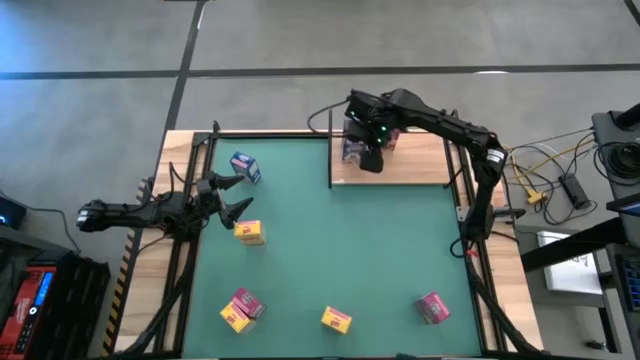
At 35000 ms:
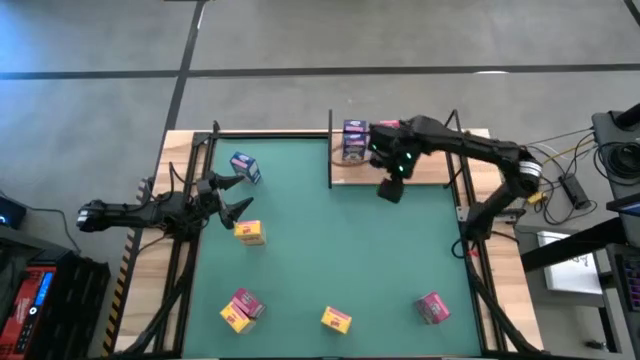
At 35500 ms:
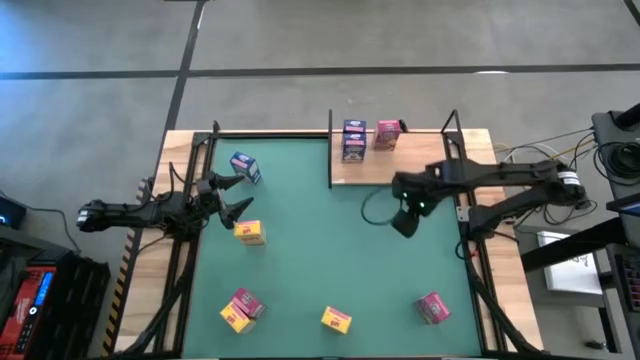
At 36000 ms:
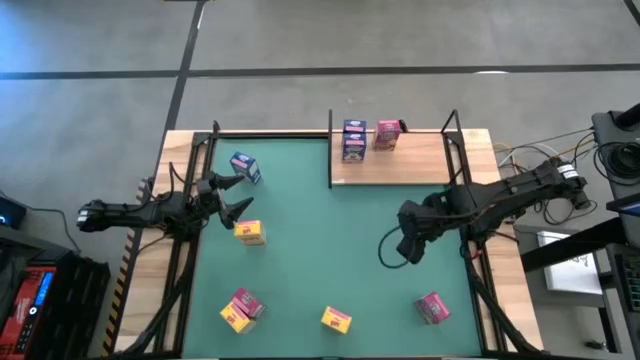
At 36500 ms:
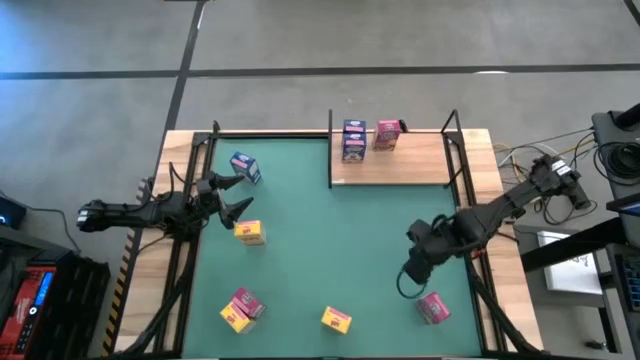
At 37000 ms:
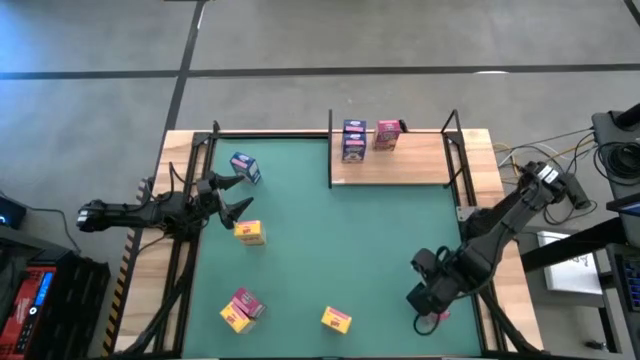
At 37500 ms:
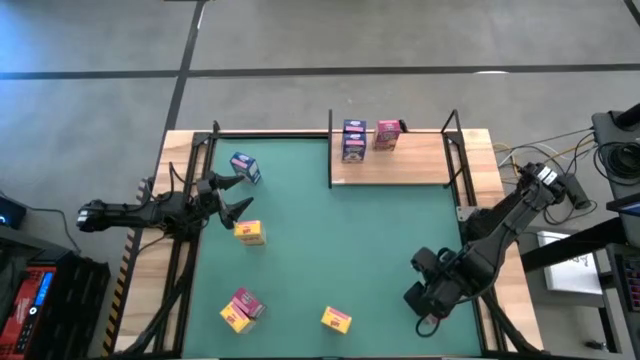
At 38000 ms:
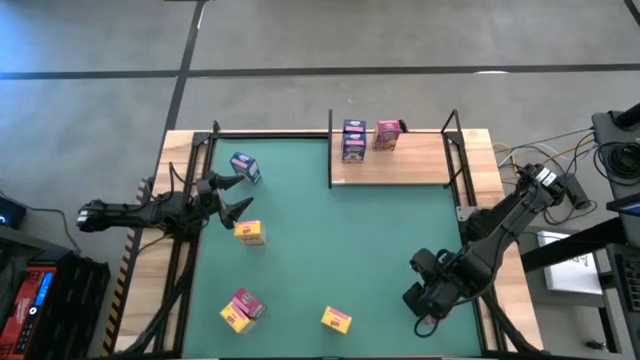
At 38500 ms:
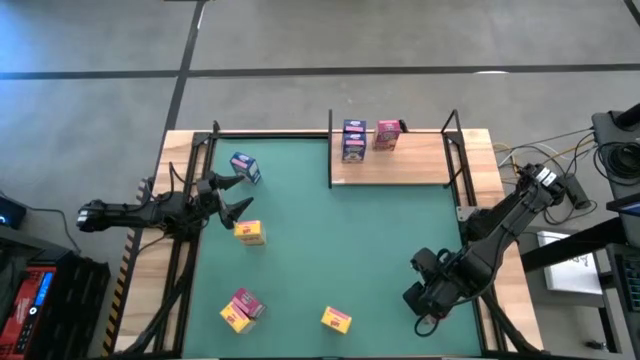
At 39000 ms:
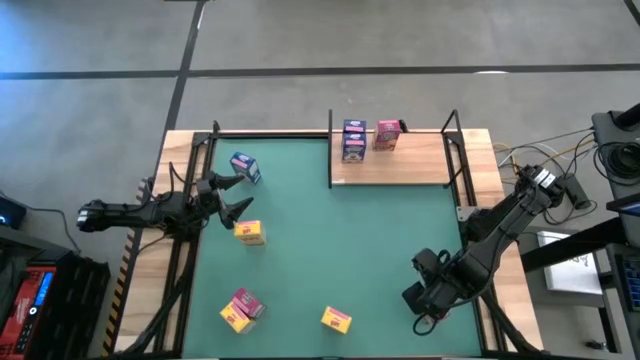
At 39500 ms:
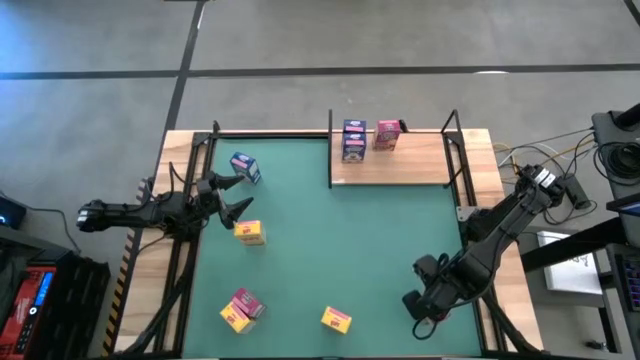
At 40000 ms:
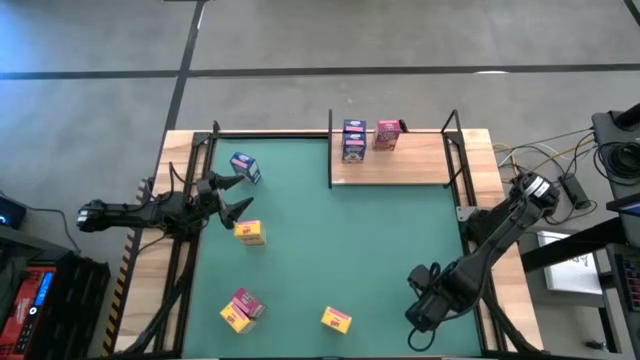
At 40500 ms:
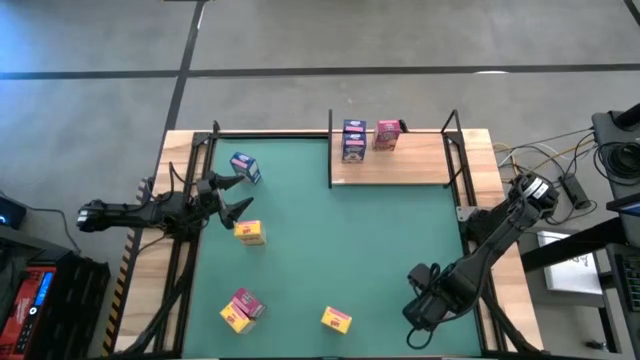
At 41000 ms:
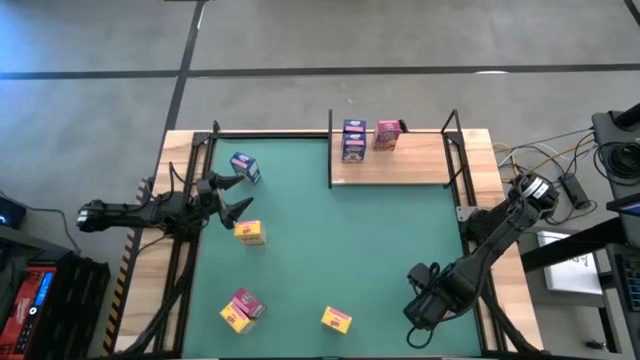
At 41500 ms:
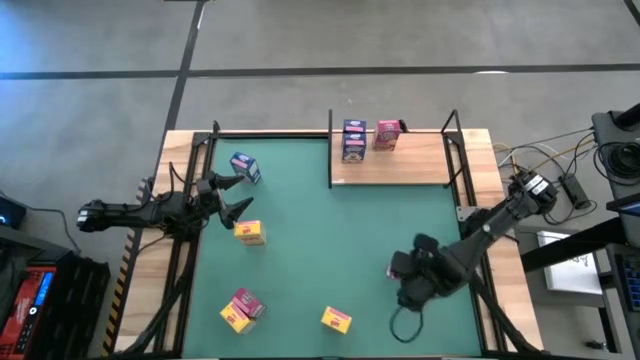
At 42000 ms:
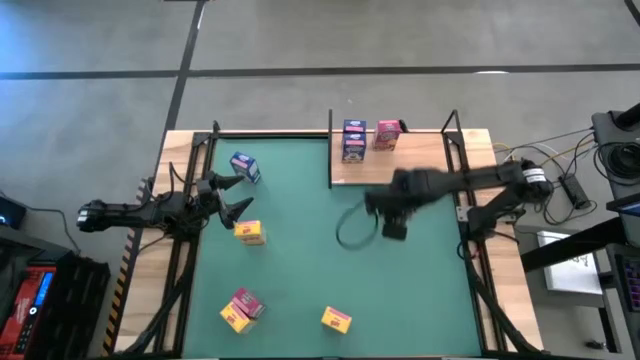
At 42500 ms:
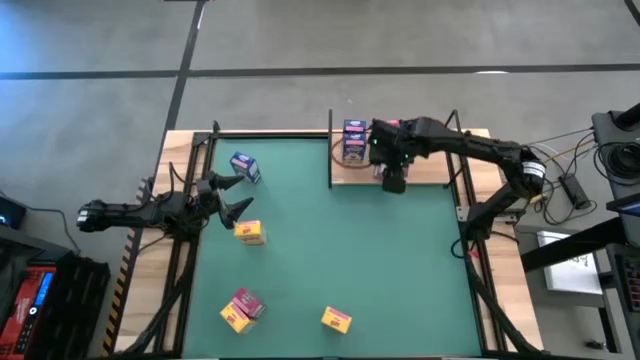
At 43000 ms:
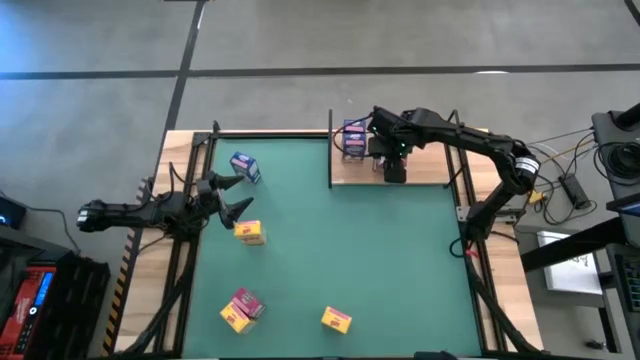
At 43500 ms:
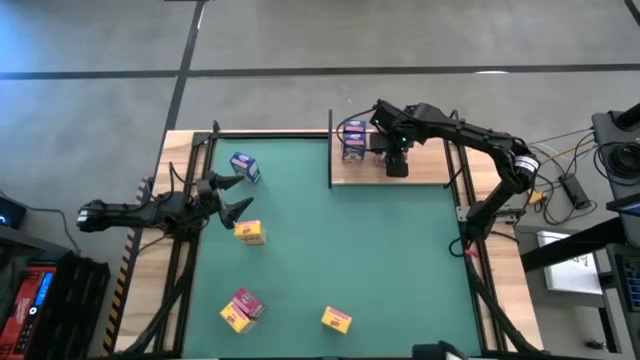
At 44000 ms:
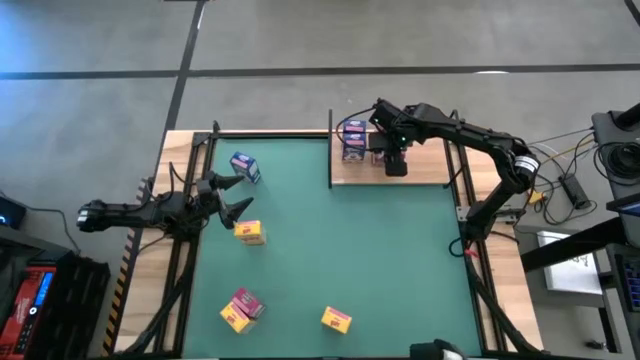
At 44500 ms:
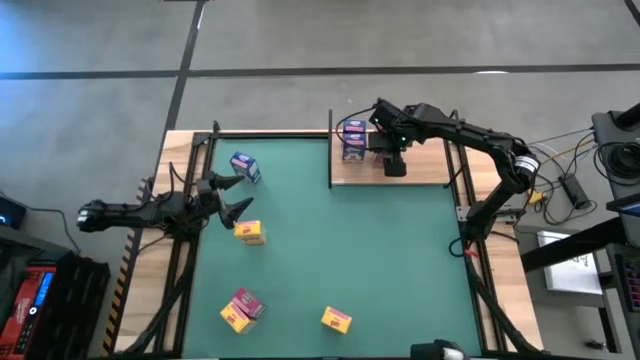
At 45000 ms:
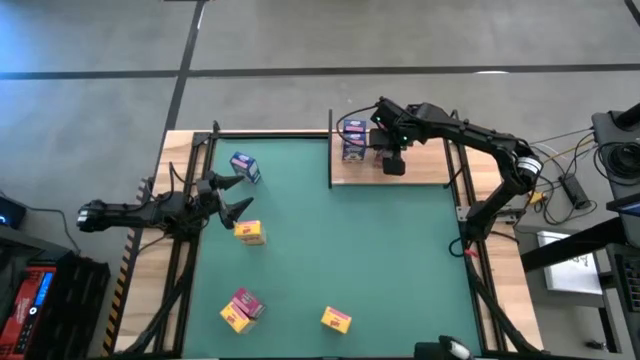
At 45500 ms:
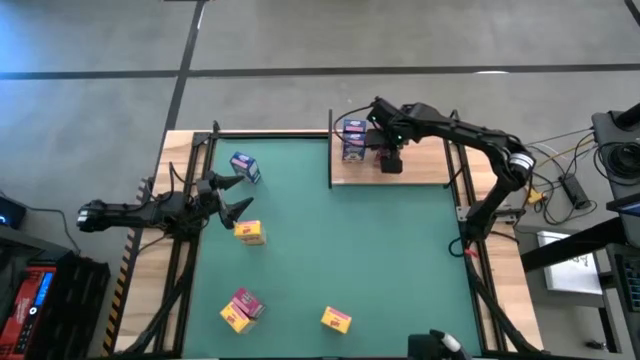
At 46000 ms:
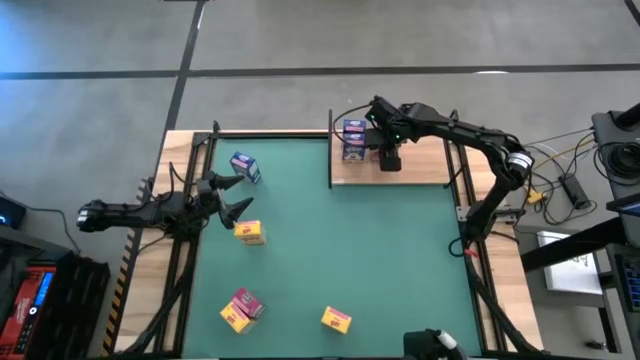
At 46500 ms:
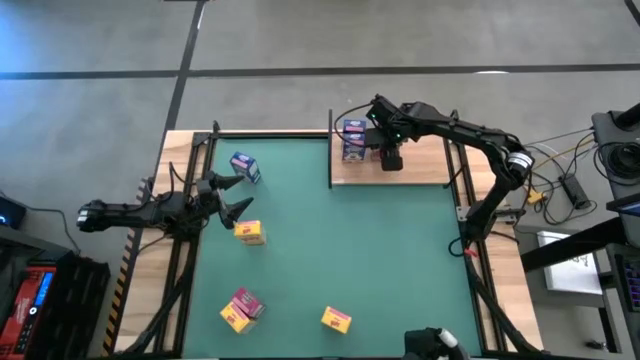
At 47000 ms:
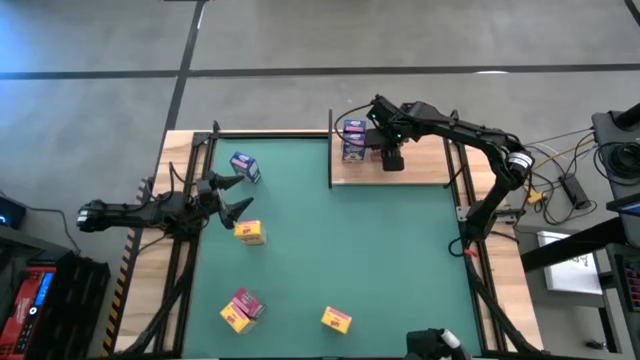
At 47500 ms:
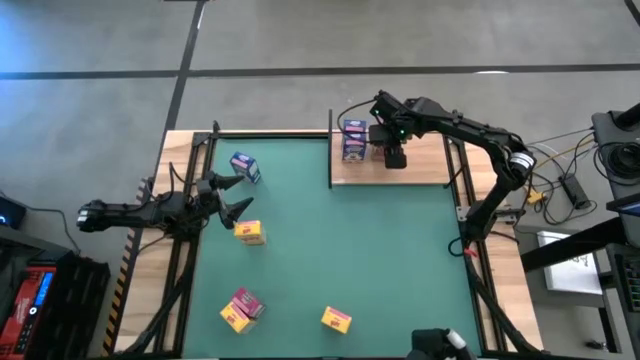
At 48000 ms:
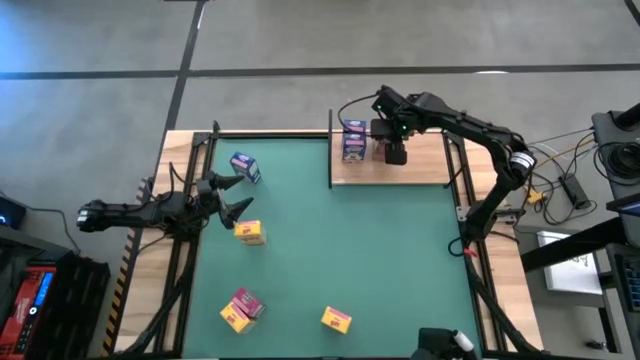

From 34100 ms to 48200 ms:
Task: Stack cereal on shelf
Put the right pink cereal box on the shelf

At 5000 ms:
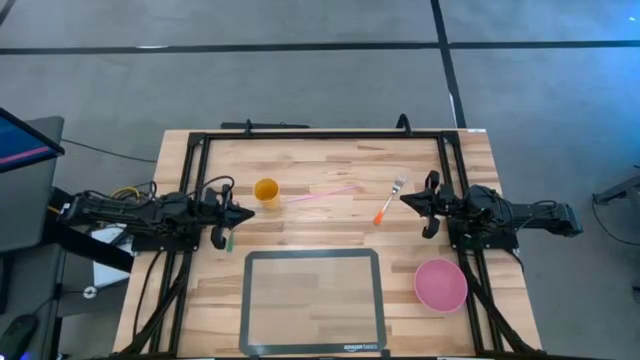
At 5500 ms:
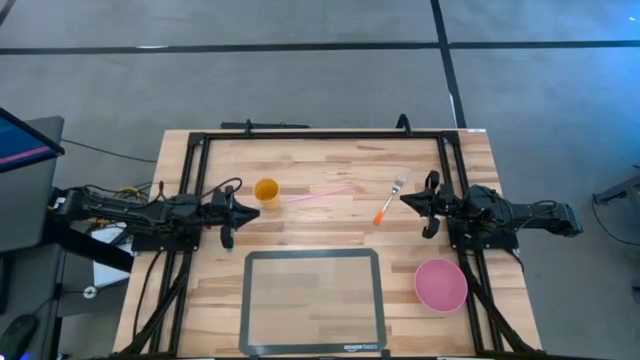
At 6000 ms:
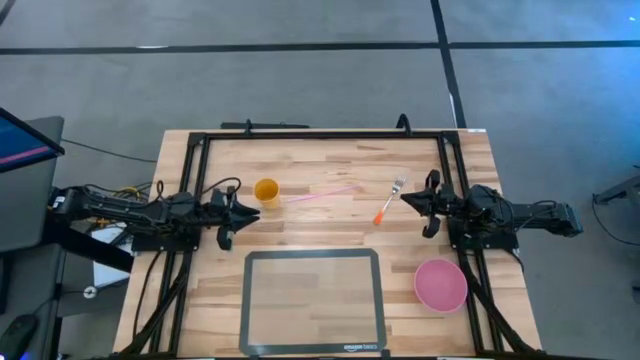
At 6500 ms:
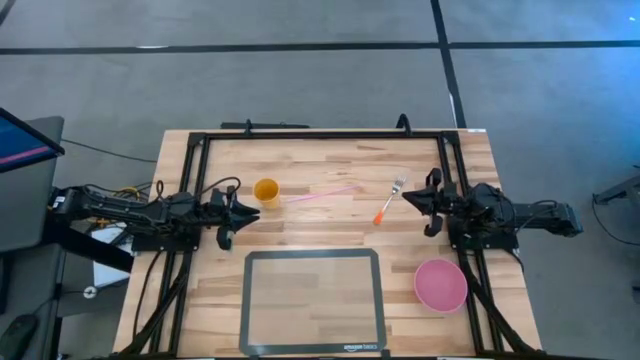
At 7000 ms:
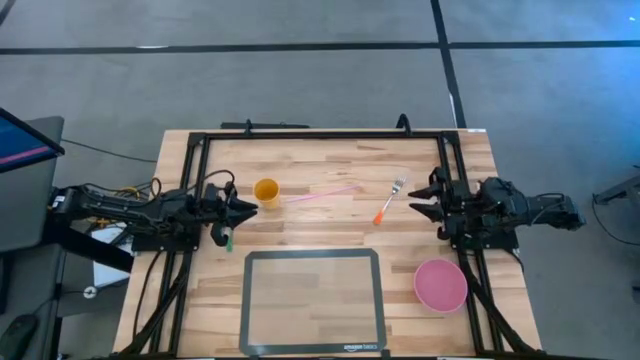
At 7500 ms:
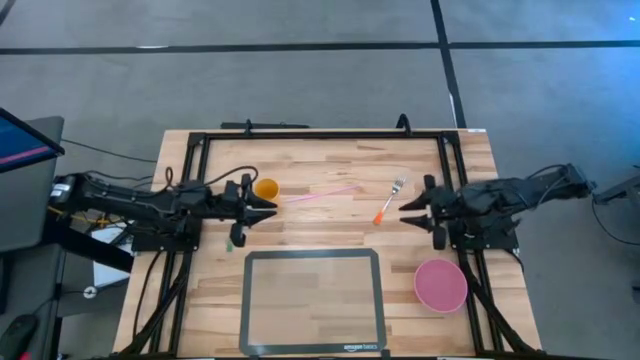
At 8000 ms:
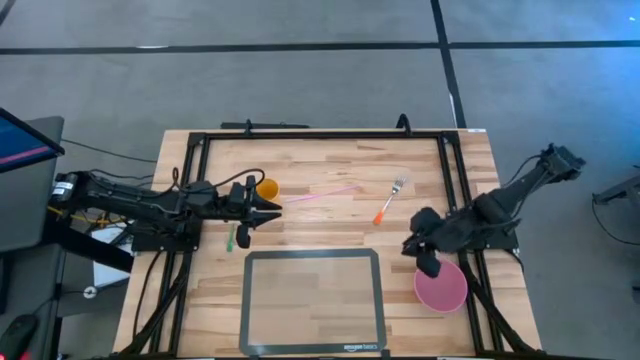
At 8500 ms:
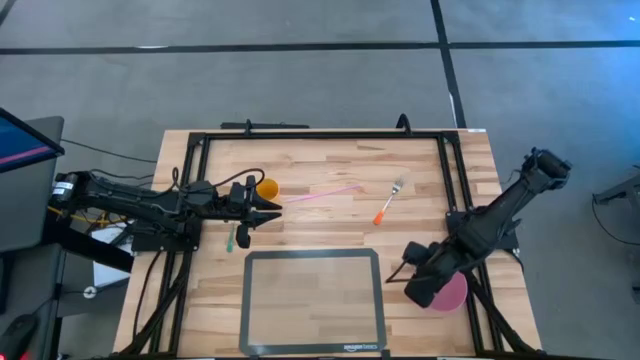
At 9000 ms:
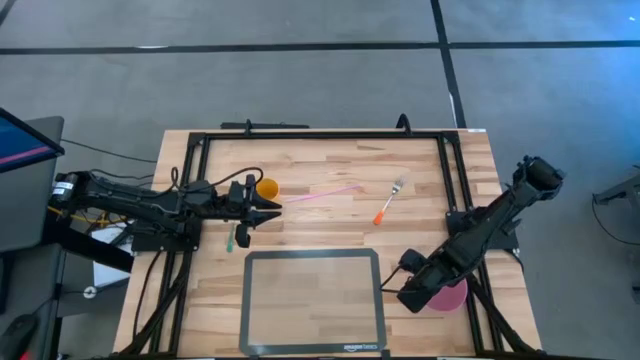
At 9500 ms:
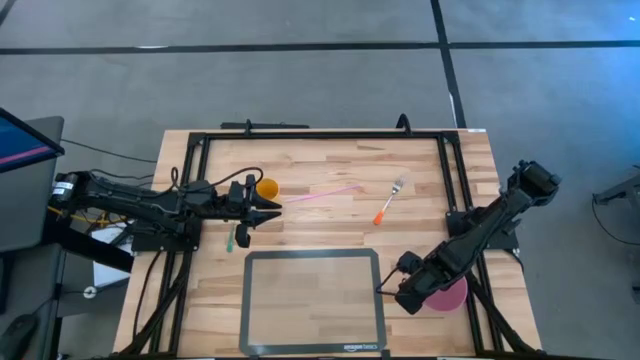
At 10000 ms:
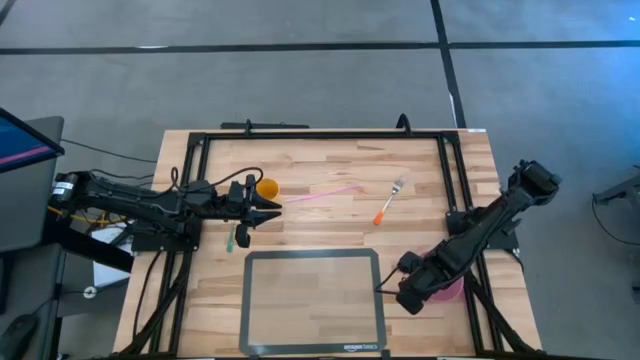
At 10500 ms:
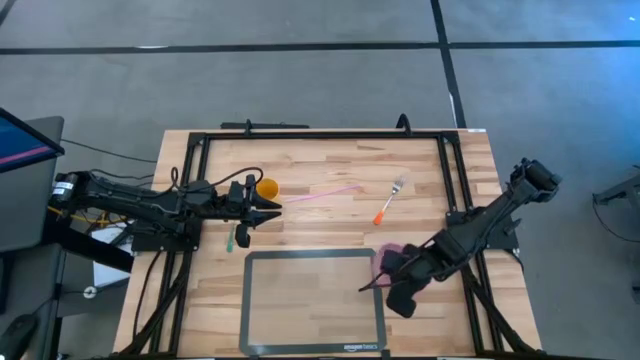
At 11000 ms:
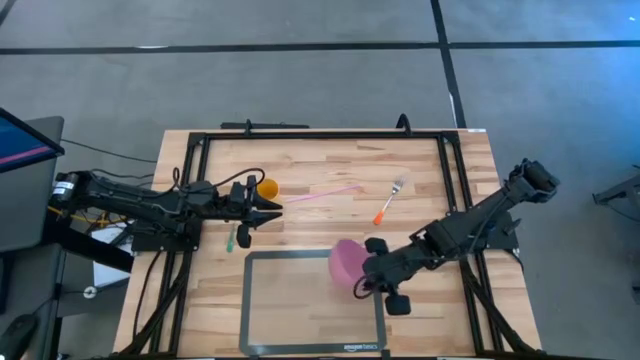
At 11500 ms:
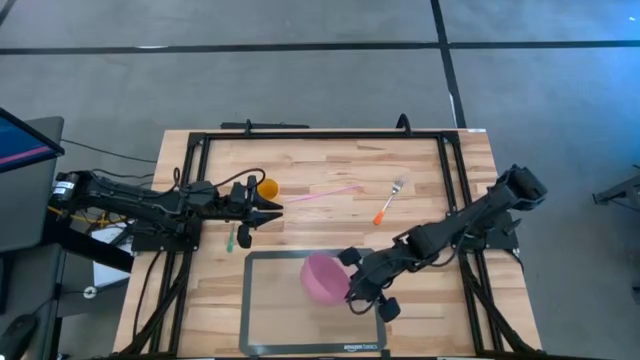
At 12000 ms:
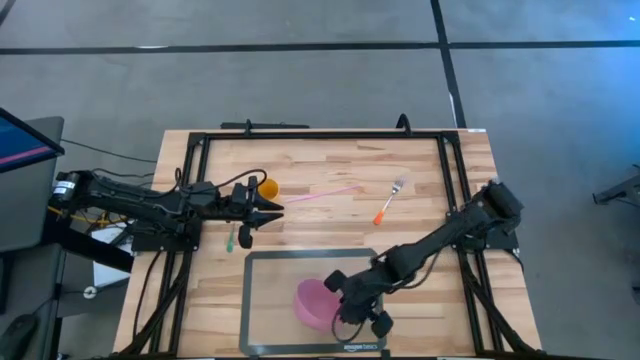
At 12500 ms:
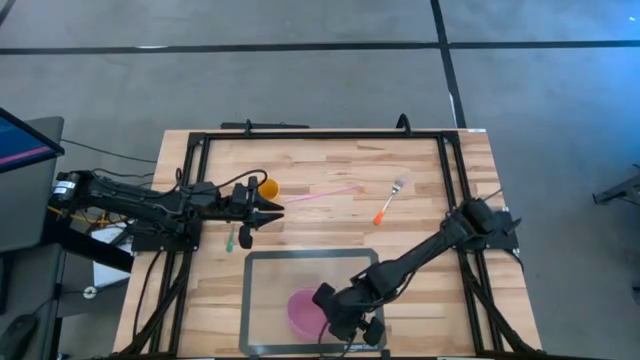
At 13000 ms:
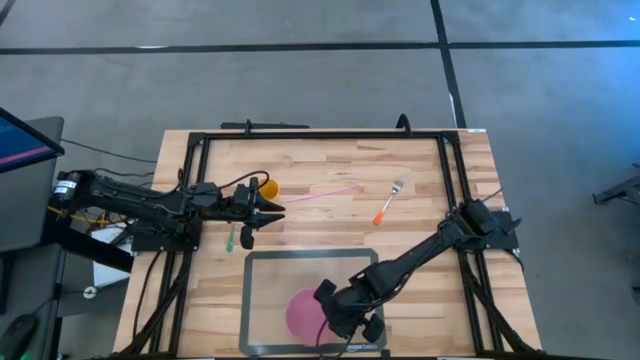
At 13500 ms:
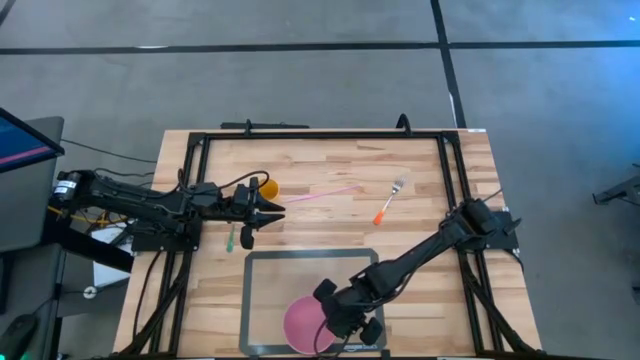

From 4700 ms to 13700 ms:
Task: Pick & Place Utensil
Put the pink bowl on the transparent mat
